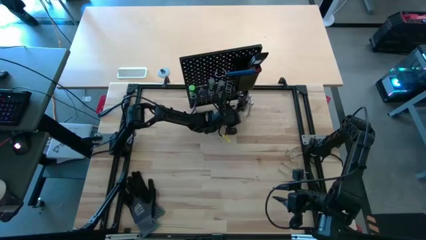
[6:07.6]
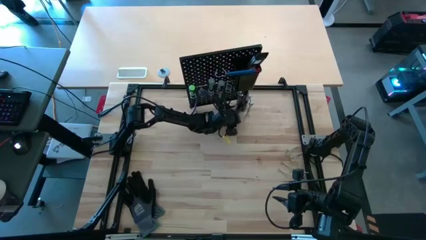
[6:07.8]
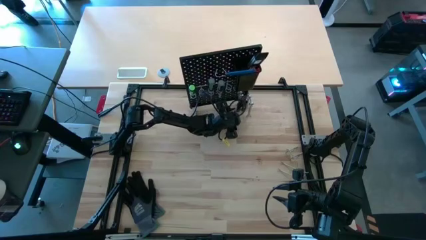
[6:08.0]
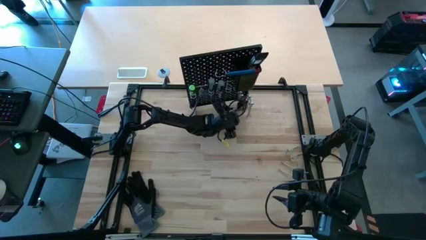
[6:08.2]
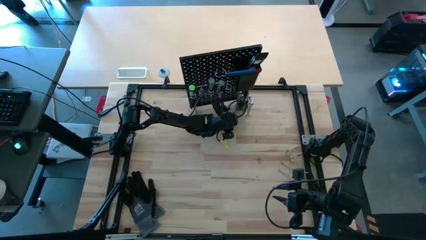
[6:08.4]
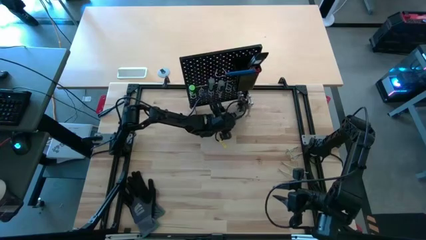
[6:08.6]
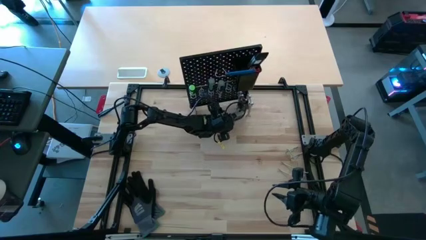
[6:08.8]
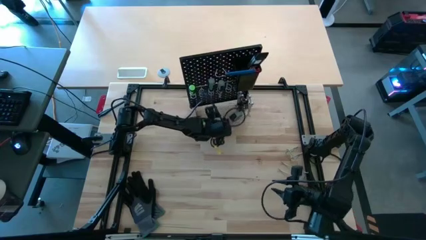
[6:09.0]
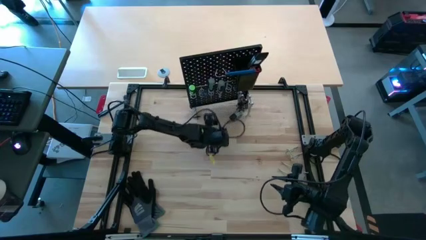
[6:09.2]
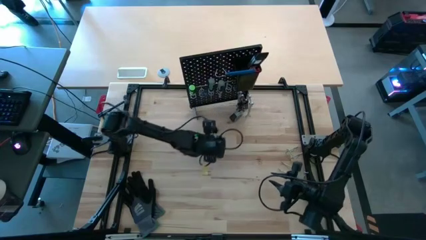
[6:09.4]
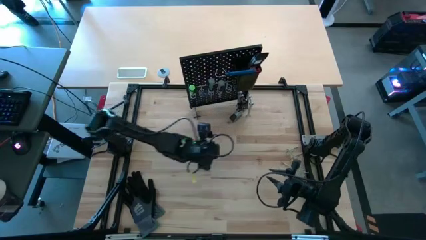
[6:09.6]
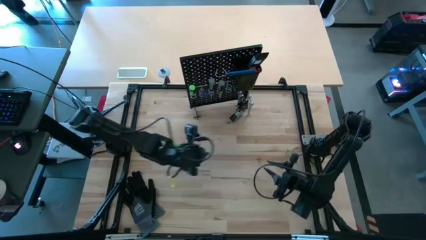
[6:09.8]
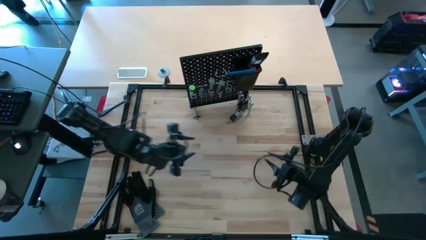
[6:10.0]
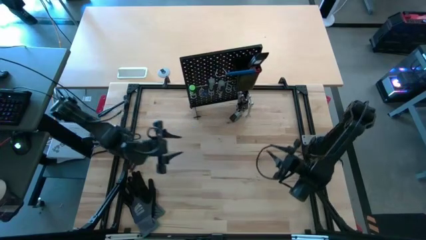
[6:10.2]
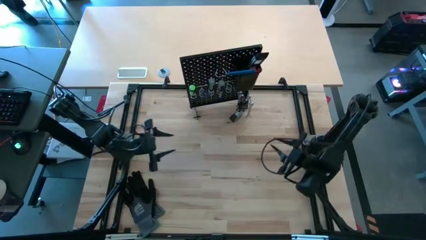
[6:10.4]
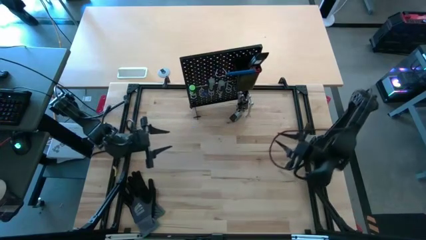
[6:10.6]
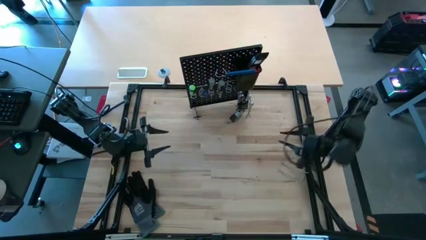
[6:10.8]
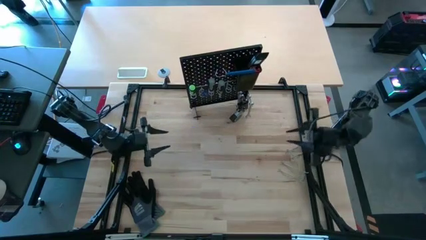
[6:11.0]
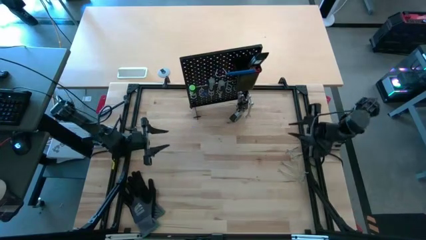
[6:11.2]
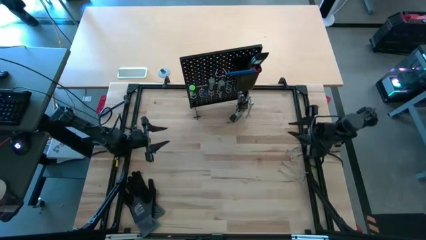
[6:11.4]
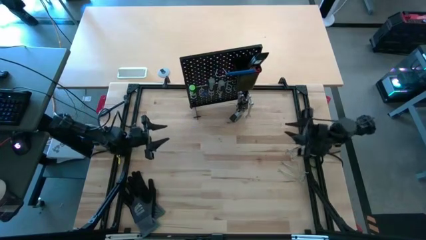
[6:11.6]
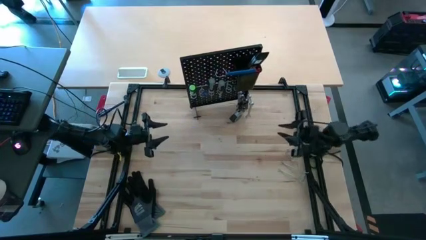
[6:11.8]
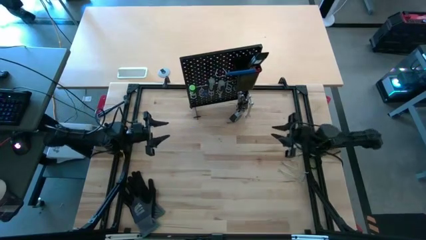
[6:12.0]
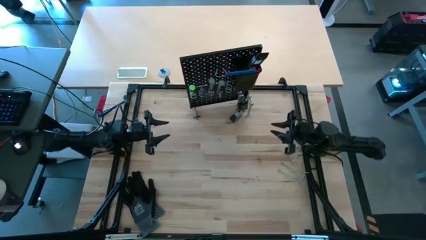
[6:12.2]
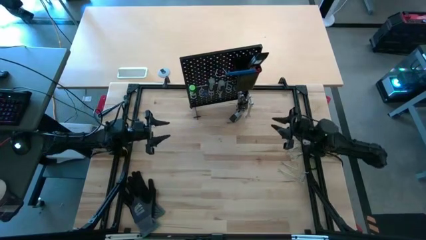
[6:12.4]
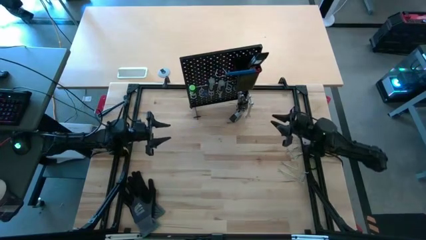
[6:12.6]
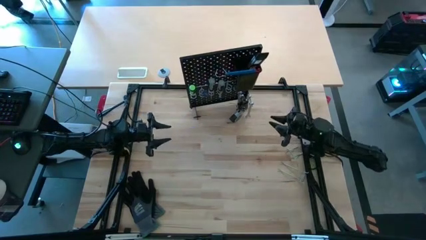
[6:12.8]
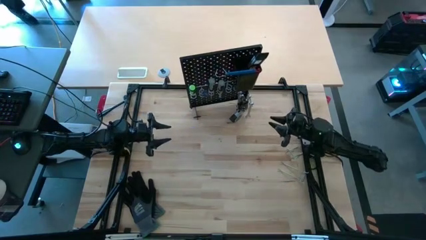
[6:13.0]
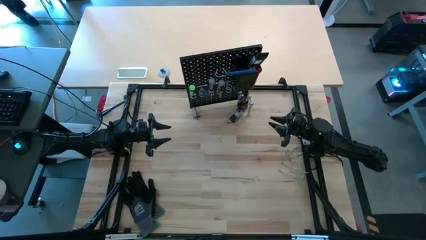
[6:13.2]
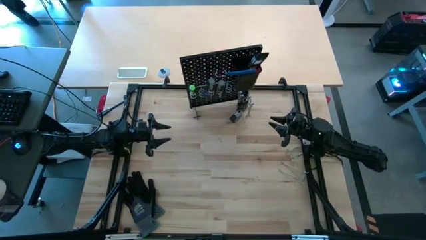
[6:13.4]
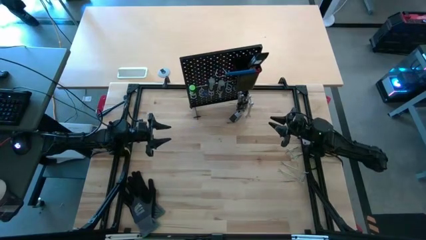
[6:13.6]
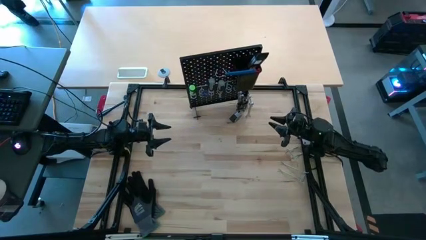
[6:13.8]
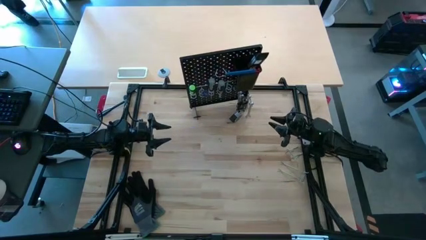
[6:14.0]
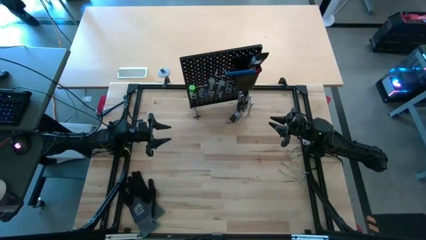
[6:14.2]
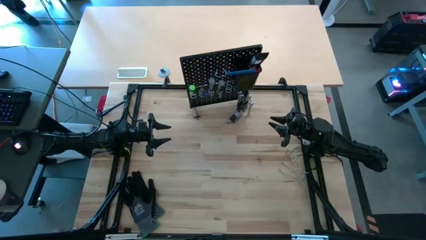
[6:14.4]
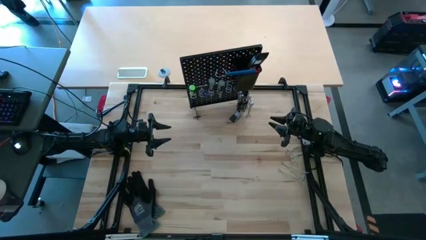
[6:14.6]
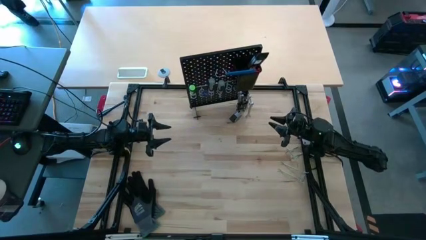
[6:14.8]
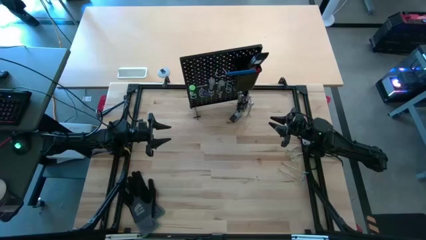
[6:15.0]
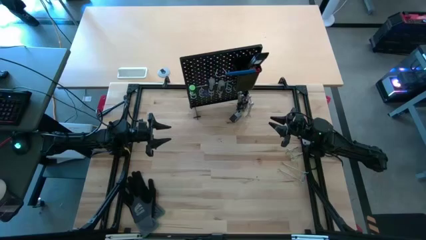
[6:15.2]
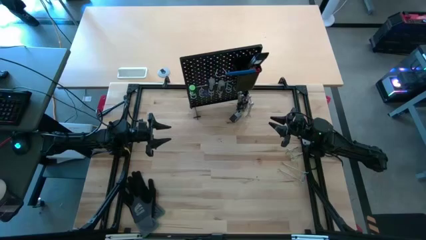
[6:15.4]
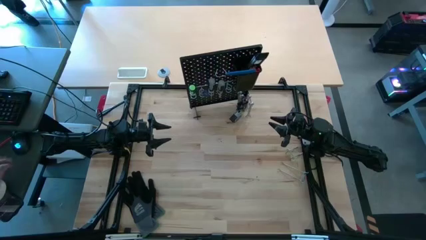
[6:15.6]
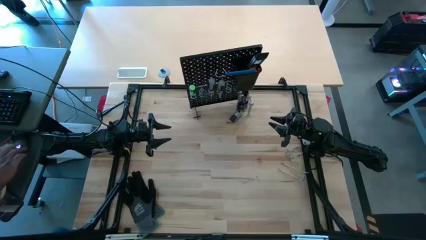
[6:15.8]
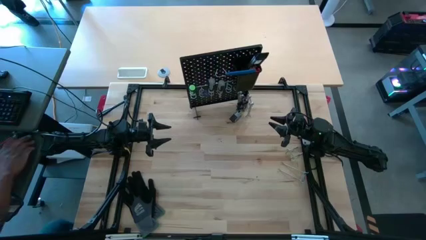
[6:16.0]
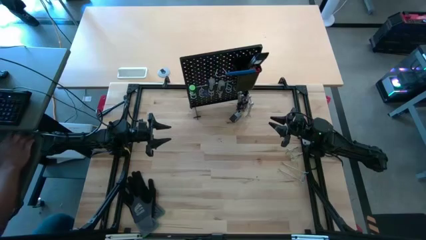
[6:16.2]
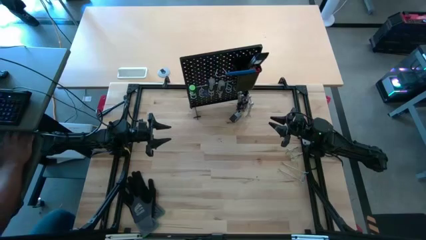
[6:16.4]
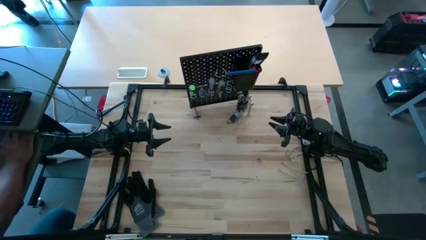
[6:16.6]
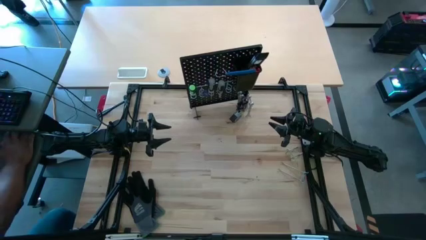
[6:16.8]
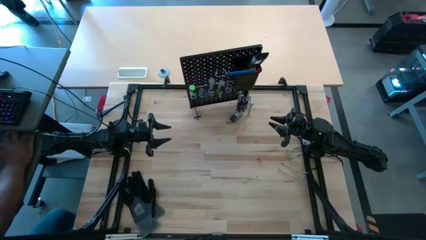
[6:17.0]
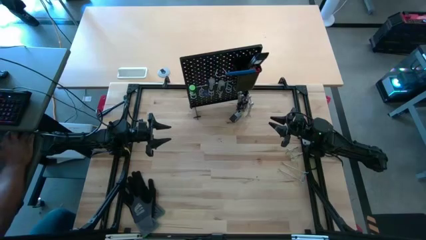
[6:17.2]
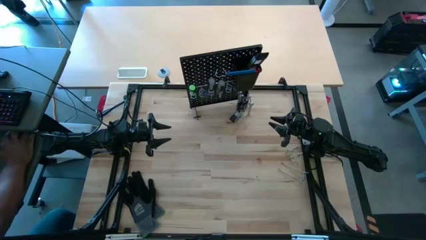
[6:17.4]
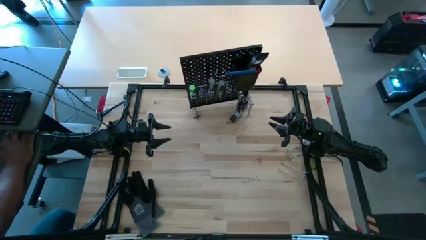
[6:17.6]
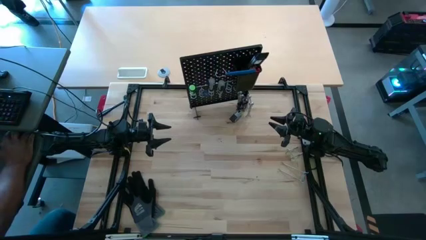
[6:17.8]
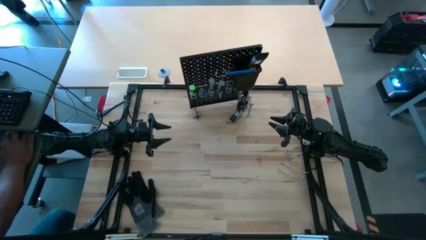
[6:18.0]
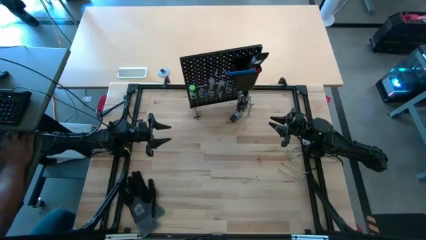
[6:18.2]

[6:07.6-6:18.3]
Task: Hang tools onto peg board
Return to Home Position

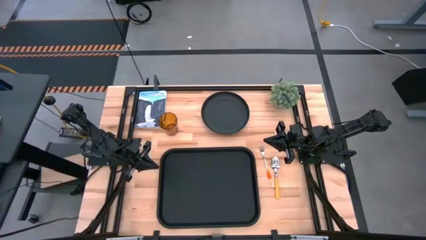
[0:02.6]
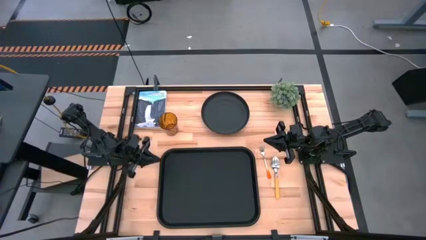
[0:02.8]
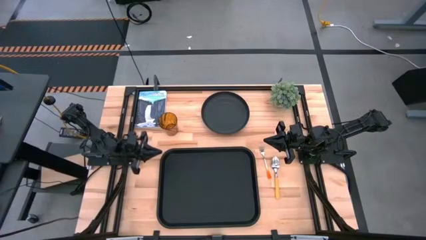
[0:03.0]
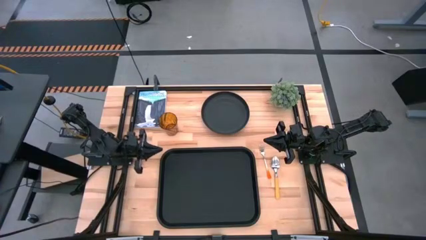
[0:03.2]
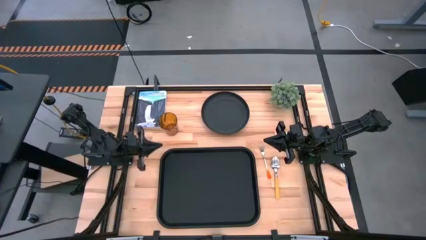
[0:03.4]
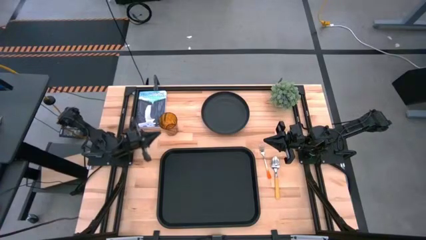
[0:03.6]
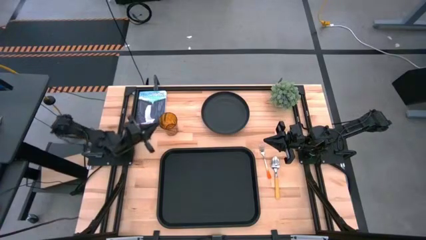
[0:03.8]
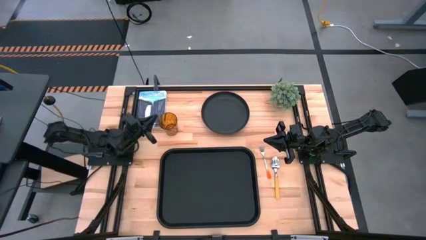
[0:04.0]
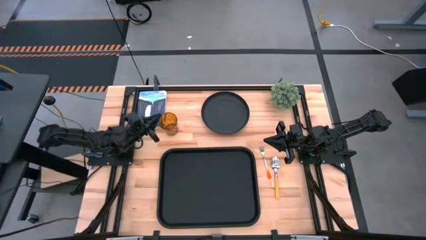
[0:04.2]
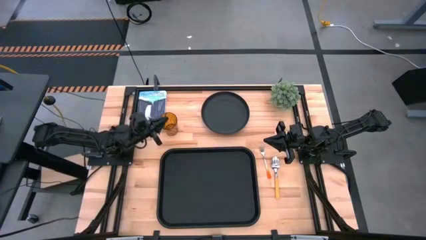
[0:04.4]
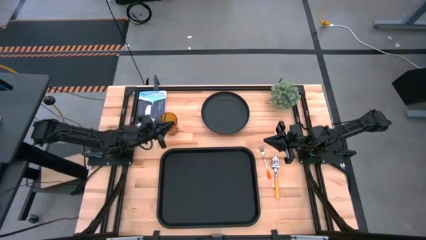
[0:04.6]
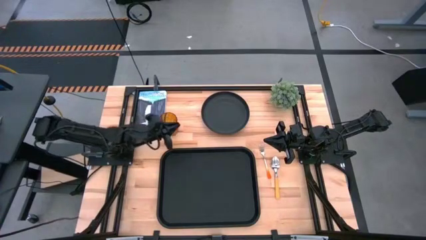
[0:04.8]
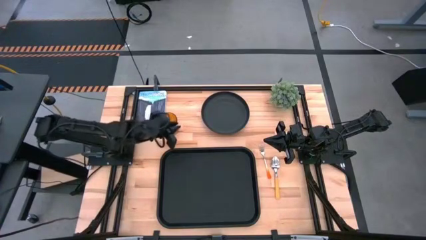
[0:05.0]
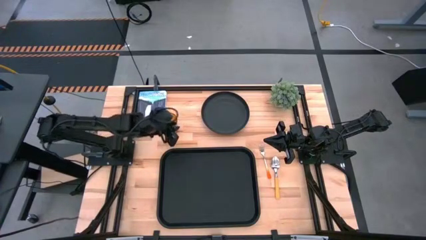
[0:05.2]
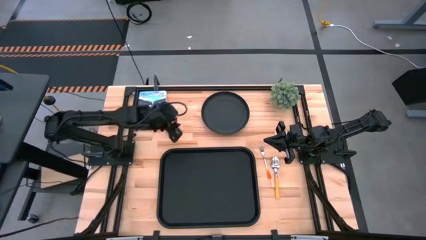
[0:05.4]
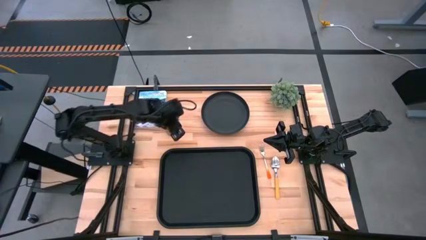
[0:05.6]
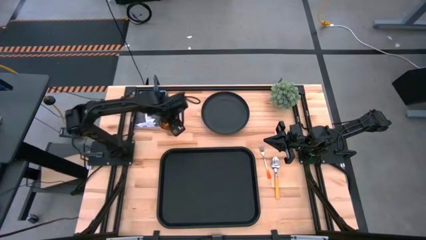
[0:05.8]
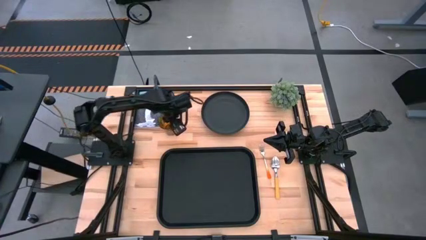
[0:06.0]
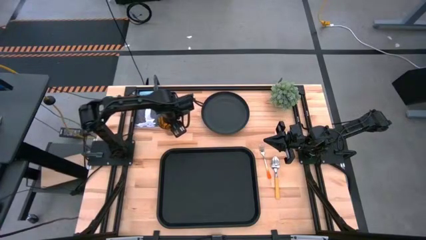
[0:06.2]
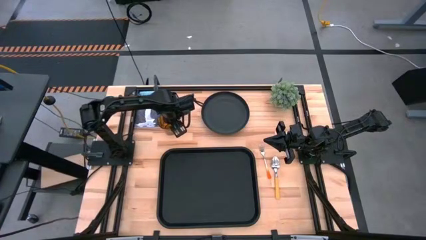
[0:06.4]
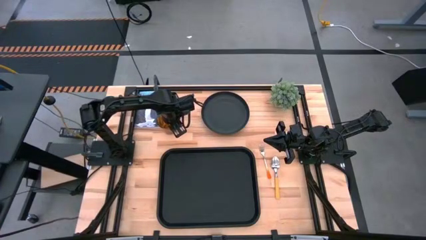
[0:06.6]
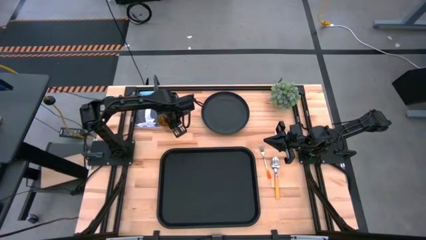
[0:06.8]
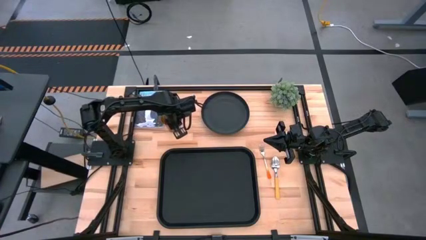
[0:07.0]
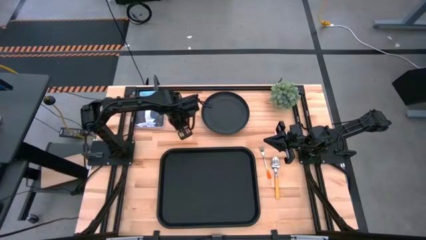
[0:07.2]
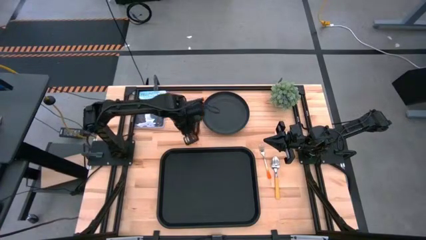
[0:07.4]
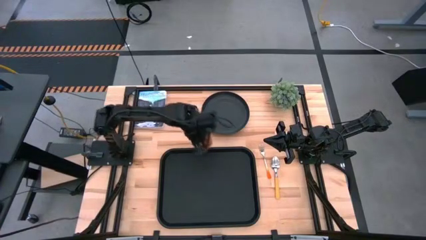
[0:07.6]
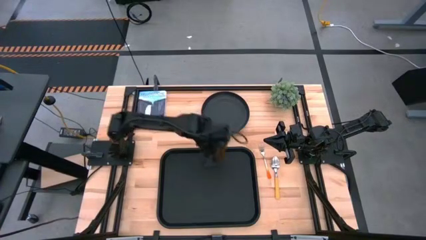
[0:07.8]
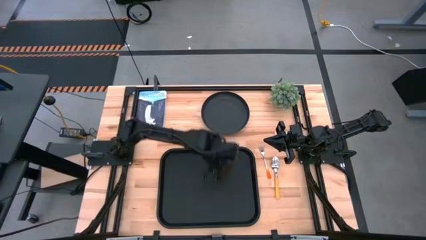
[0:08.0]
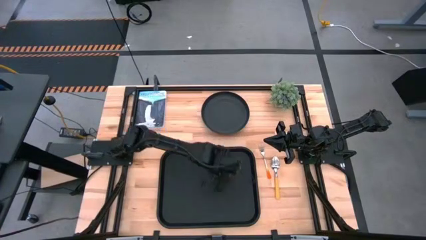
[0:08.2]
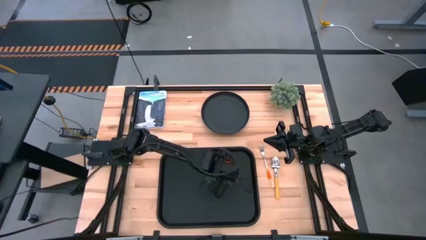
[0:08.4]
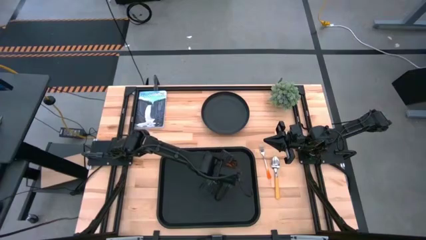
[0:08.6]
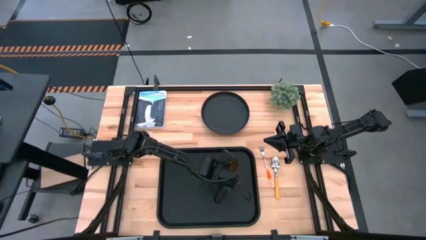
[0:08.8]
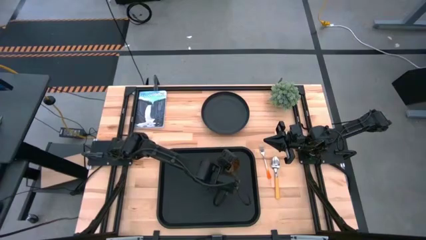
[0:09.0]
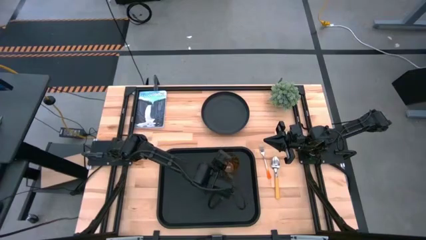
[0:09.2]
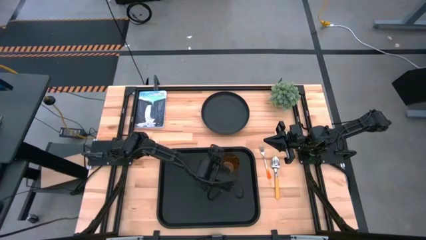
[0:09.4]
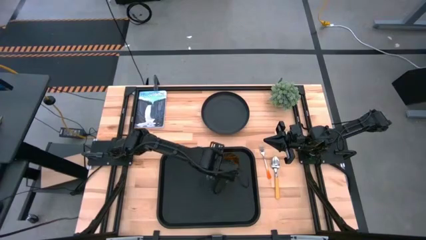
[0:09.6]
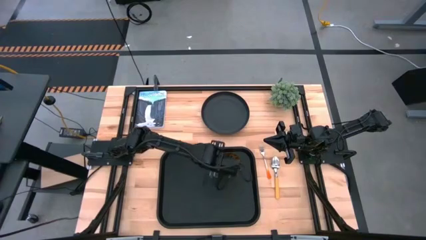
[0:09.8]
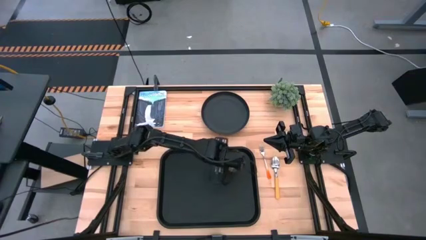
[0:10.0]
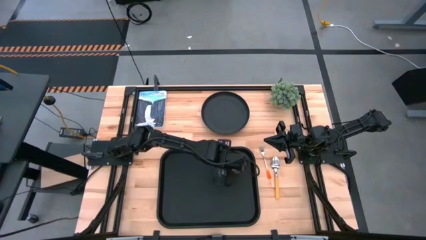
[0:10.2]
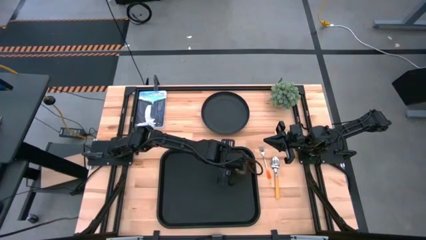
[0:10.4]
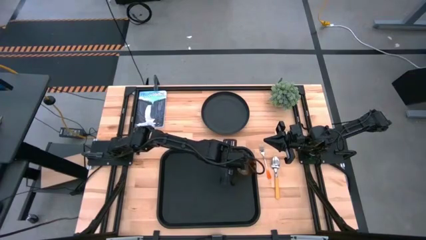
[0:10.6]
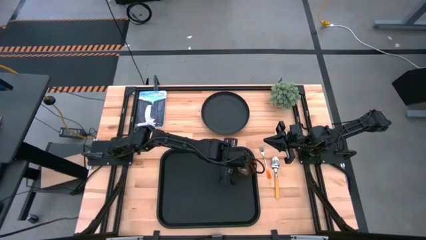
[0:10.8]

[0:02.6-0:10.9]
Task: Pick and place plate/cup/fork/spoon on tray
Put the brown glass on the black serving tray
